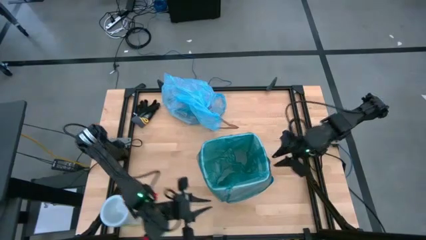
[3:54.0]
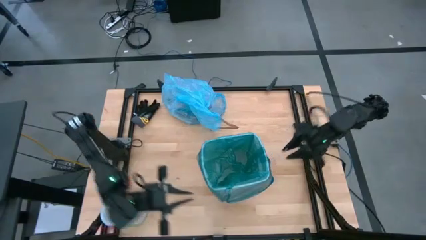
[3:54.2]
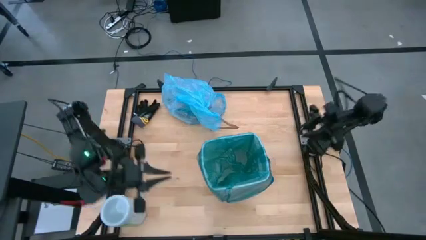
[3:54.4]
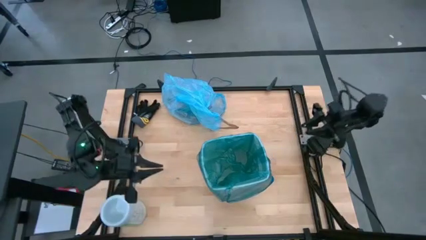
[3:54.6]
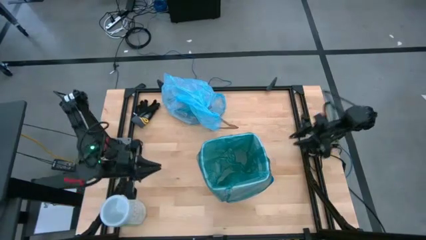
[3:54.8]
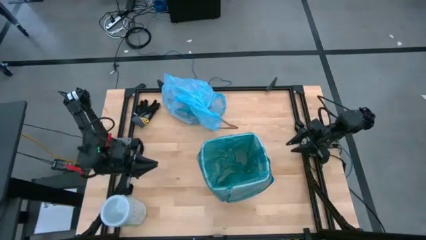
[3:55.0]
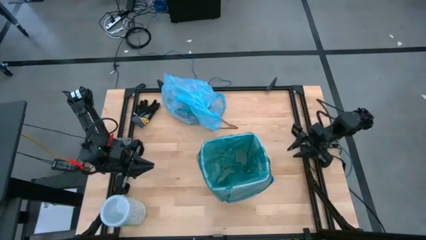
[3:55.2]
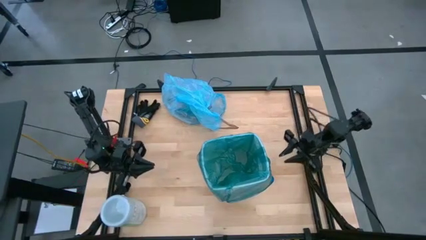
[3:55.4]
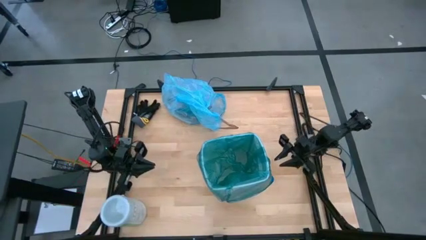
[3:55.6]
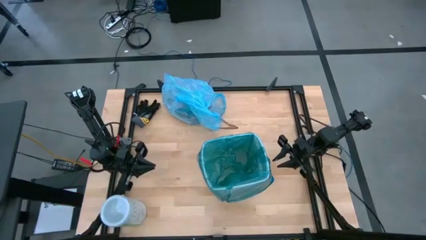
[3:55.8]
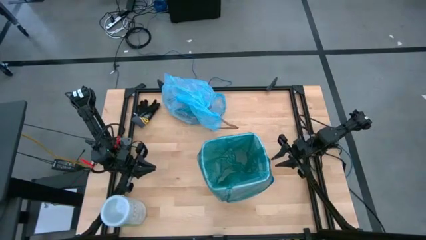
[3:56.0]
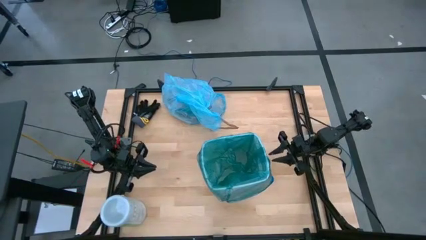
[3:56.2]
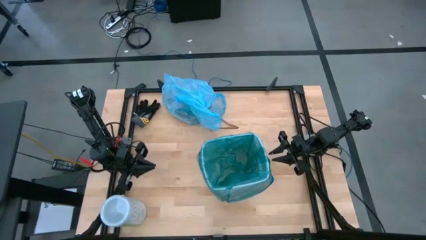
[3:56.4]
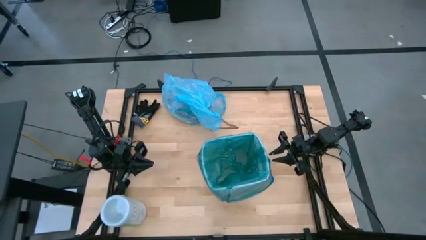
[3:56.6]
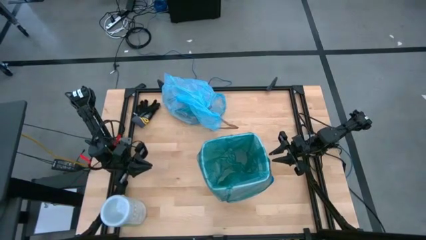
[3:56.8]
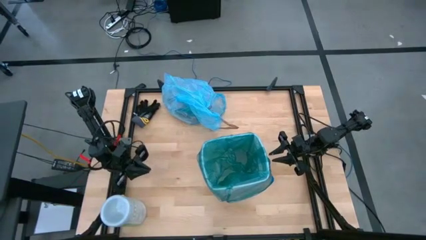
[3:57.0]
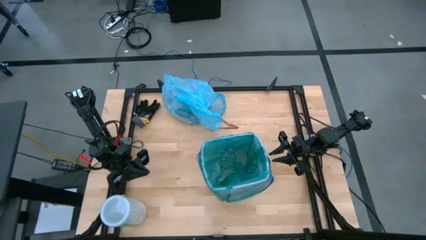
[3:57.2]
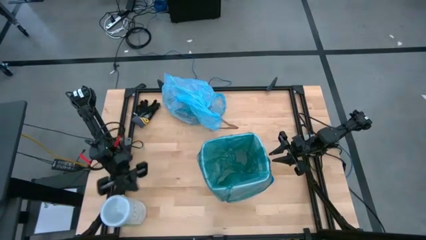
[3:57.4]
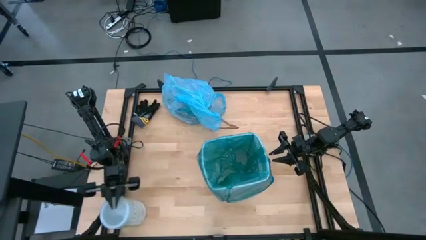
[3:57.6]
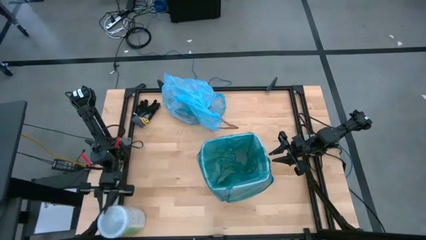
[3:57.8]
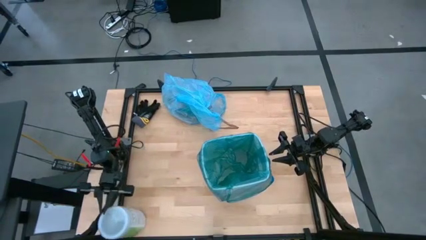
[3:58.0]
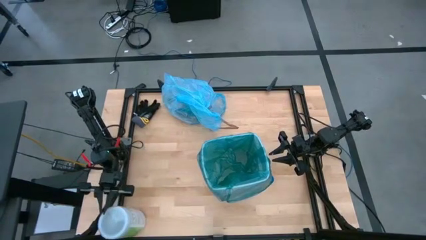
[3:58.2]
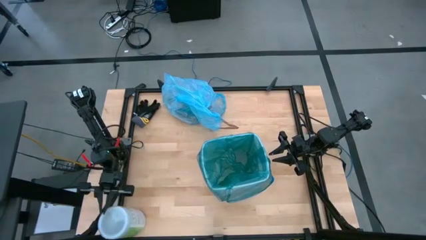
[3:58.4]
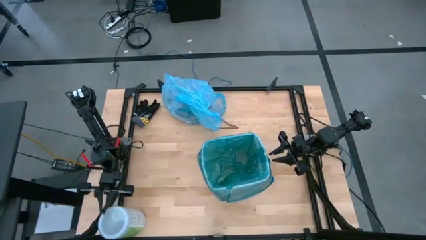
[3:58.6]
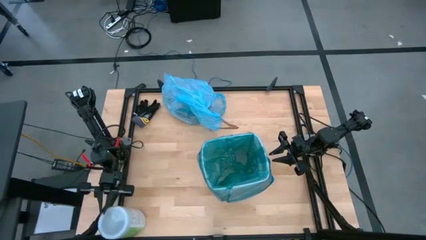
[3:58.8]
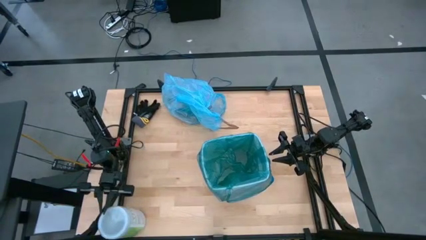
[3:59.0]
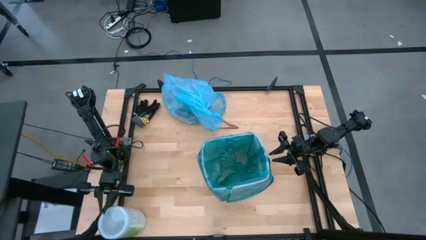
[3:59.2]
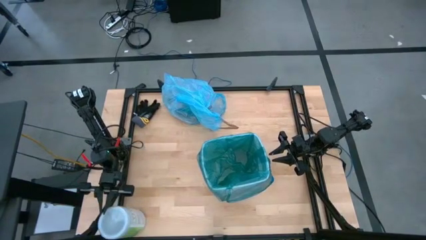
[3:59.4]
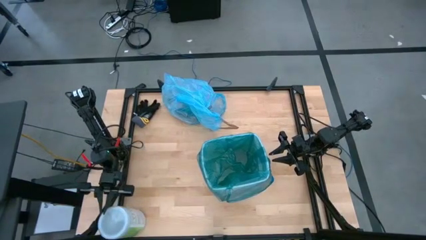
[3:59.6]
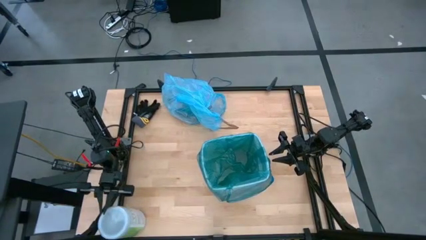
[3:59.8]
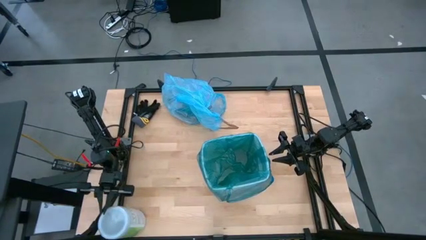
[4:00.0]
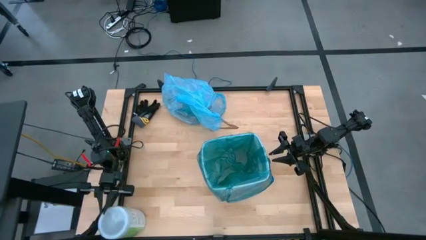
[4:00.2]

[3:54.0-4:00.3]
Task: place trash/remove bag and relplace
Return to Home Position

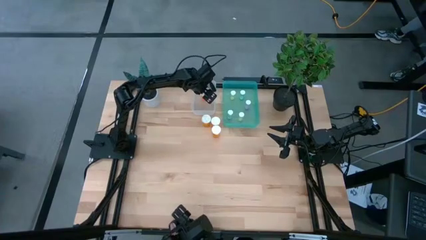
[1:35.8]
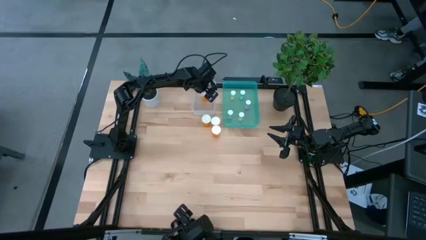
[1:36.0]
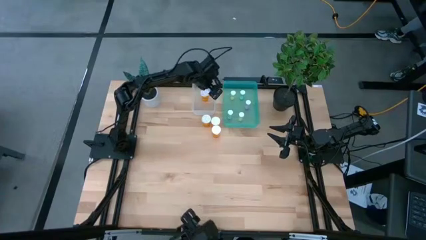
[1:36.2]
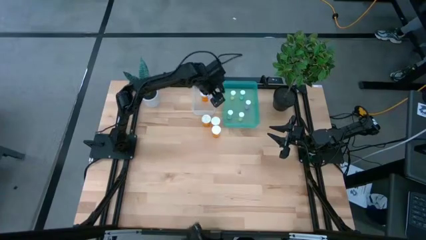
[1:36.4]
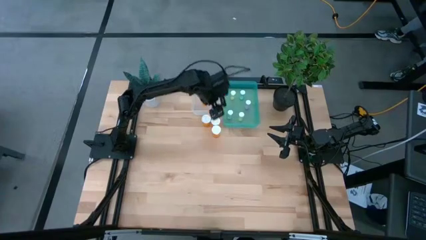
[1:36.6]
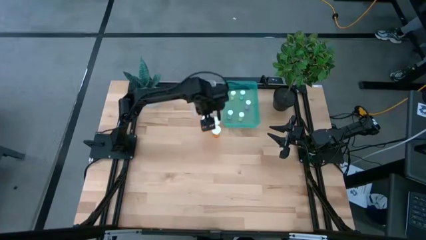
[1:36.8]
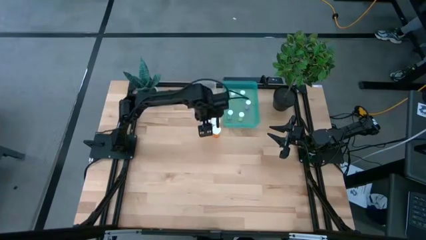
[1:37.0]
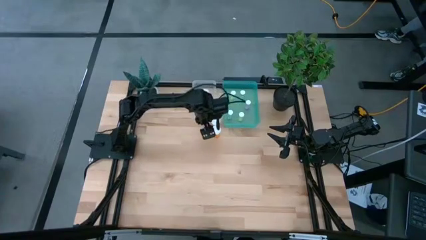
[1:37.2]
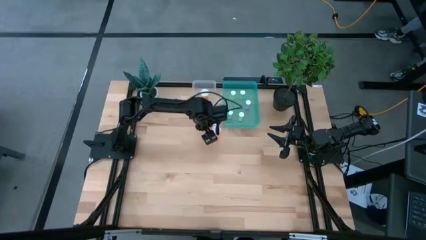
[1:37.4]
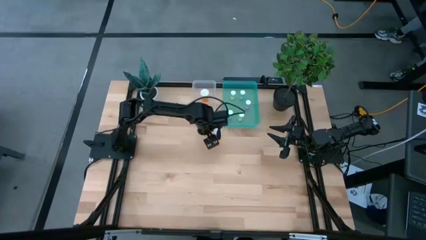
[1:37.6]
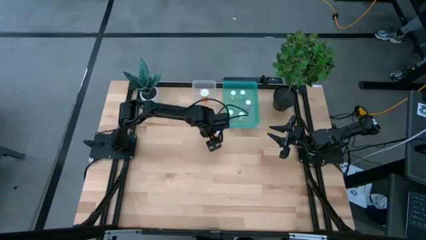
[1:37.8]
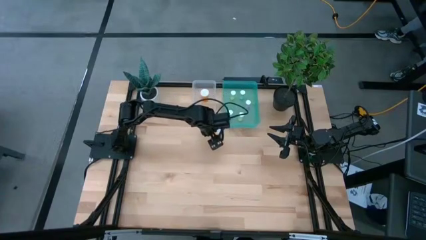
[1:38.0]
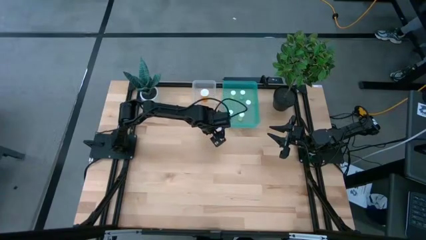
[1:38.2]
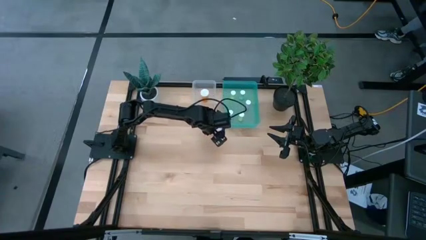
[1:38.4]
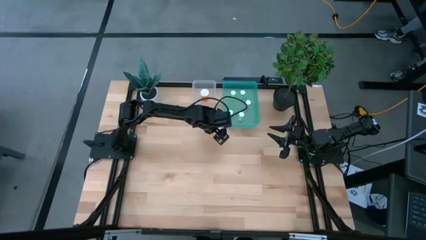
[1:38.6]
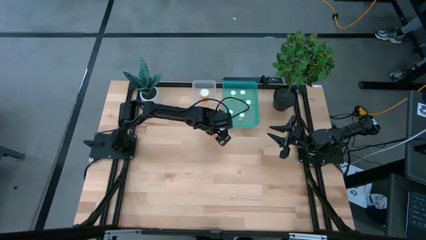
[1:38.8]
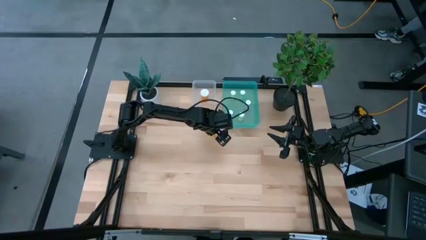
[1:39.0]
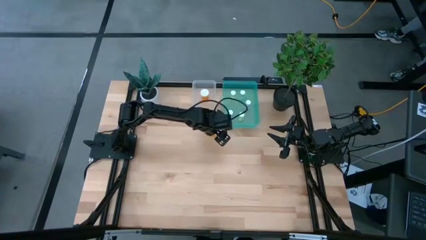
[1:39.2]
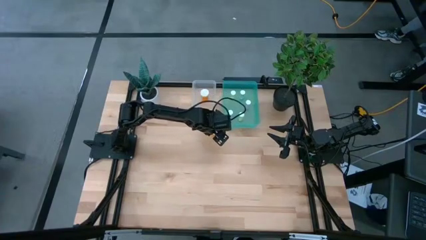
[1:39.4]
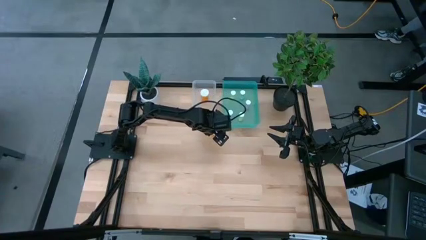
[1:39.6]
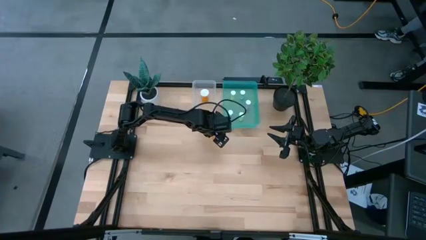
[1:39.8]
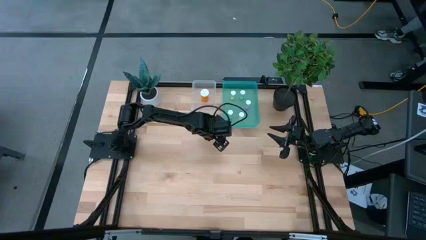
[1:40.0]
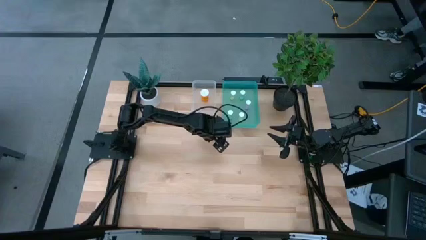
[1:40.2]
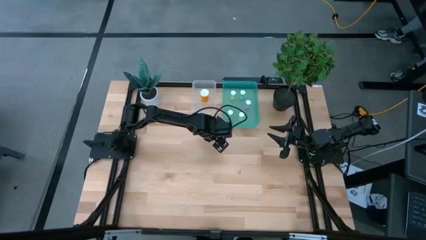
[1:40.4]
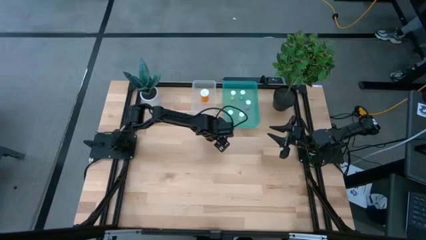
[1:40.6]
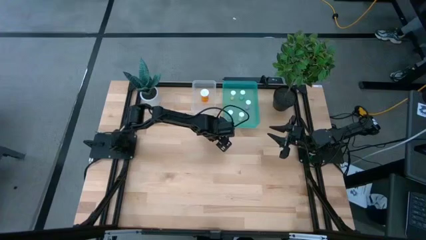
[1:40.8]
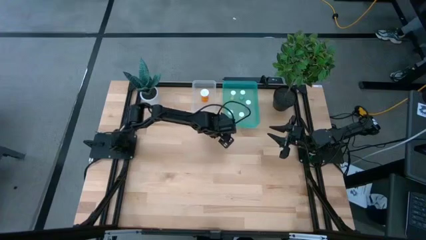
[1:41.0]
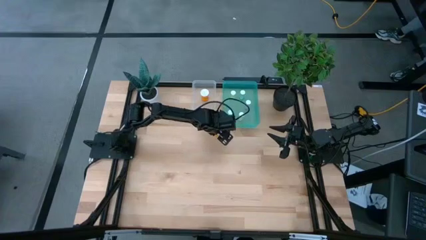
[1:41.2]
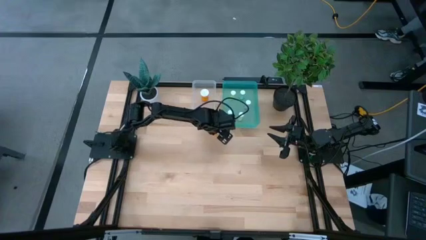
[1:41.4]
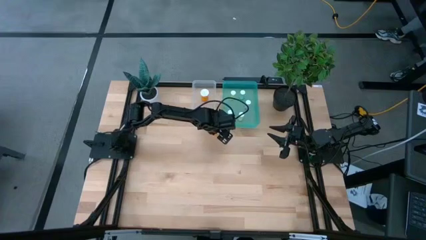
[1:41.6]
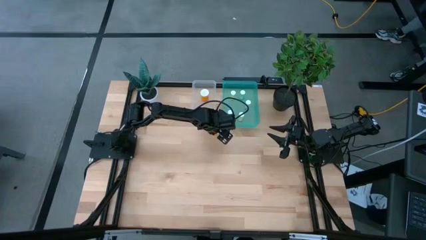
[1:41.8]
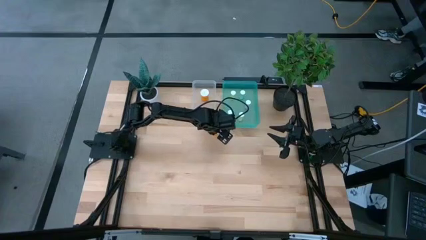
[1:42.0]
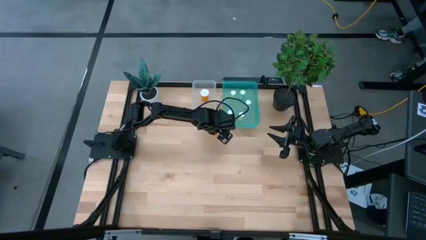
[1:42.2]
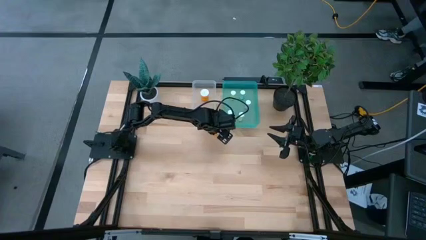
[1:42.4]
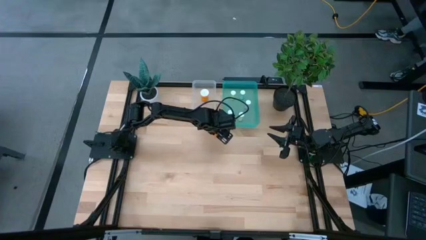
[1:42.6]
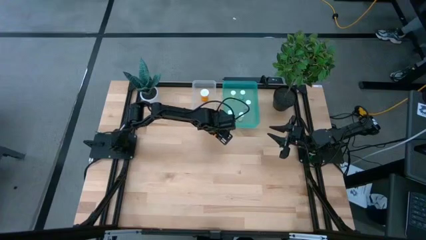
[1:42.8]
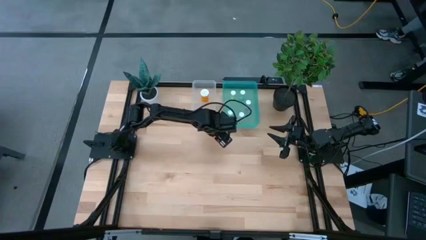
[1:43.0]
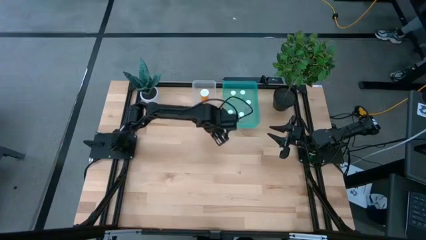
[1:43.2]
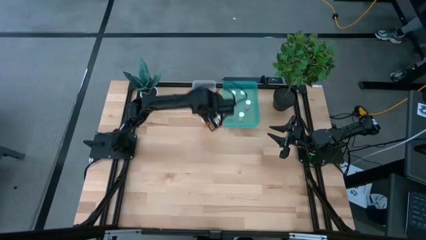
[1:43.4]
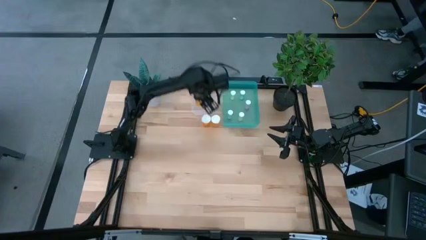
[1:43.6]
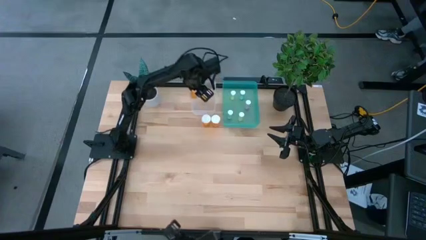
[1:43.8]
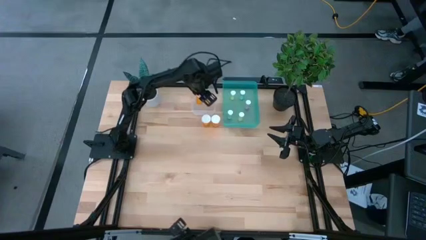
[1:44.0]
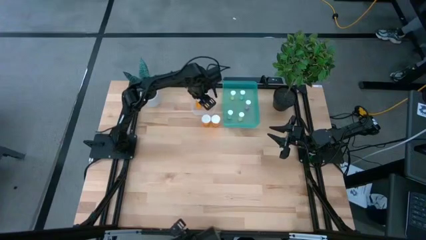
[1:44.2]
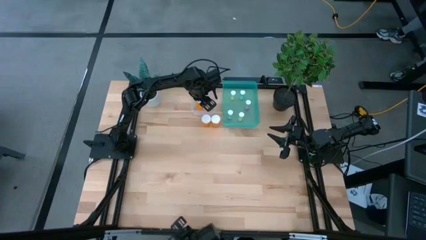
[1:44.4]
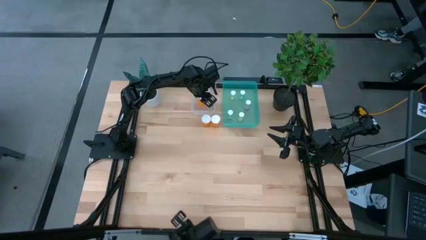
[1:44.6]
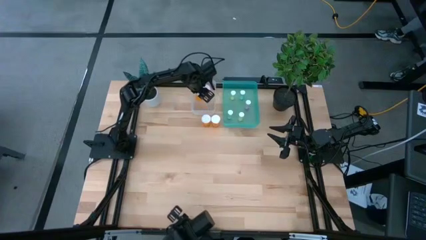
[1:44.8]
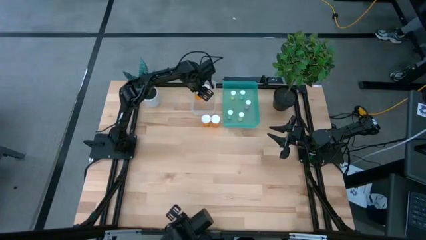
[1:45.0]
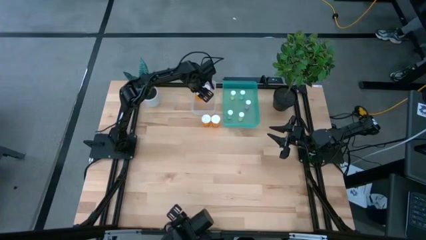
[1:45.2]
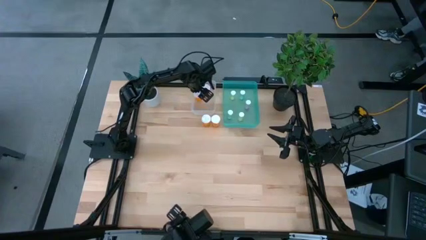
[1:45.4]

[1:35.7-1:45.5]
Task: Pick and place medicine bottles into bin by pill shape (circle, oval)
Put the orange capsule bottle into the transparent bin
